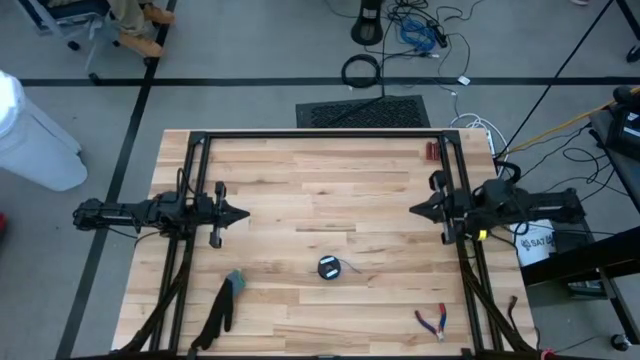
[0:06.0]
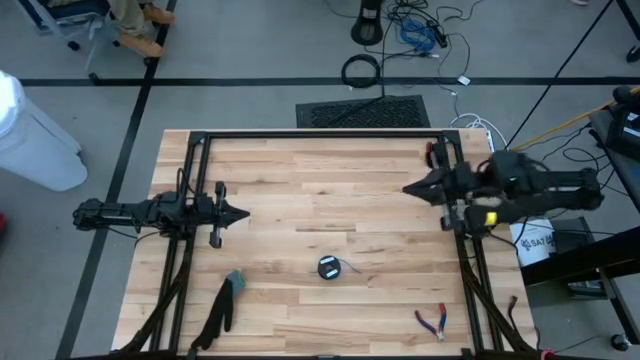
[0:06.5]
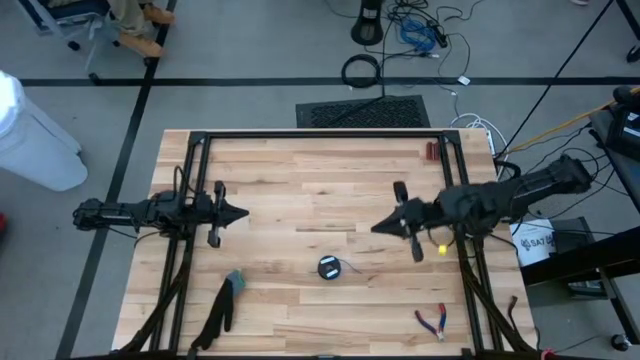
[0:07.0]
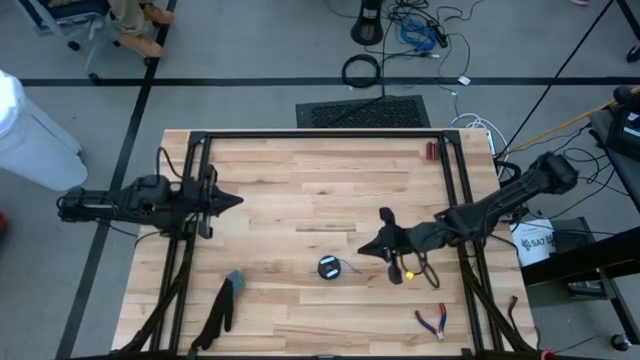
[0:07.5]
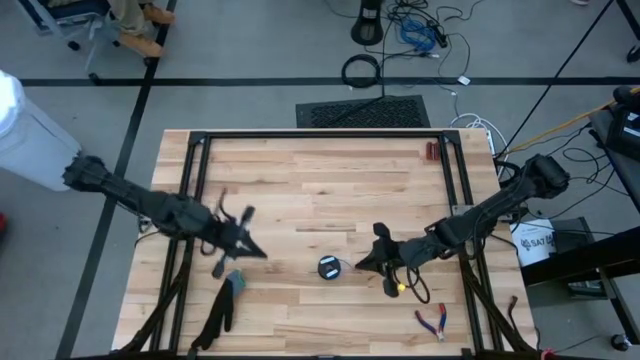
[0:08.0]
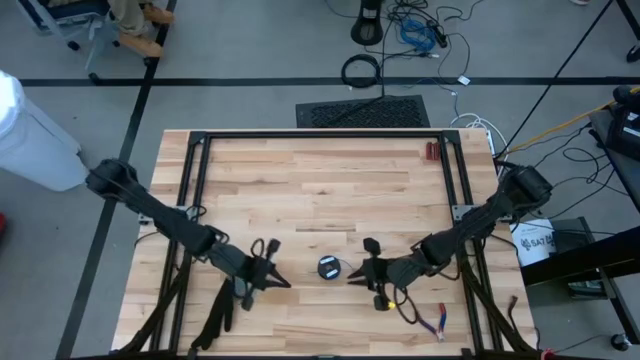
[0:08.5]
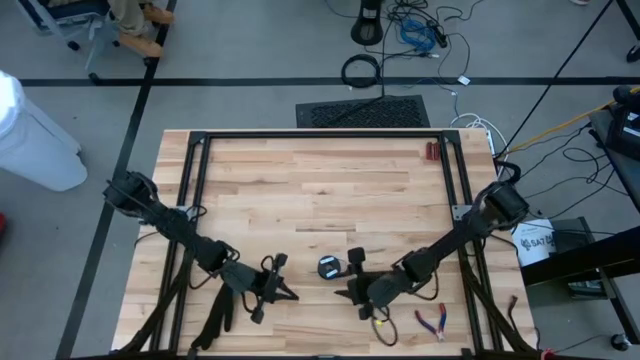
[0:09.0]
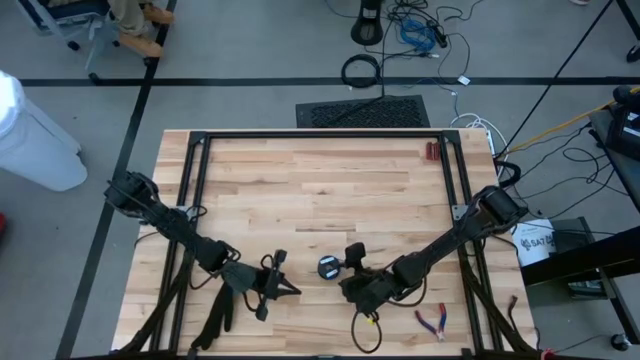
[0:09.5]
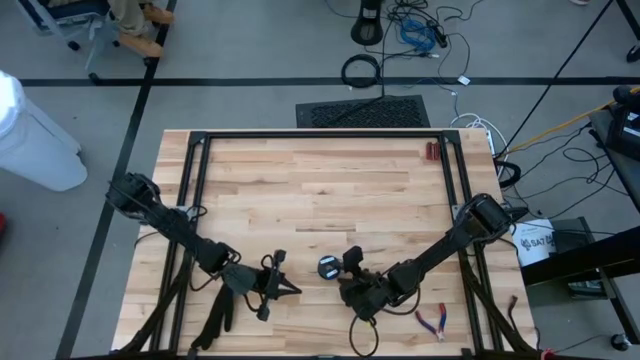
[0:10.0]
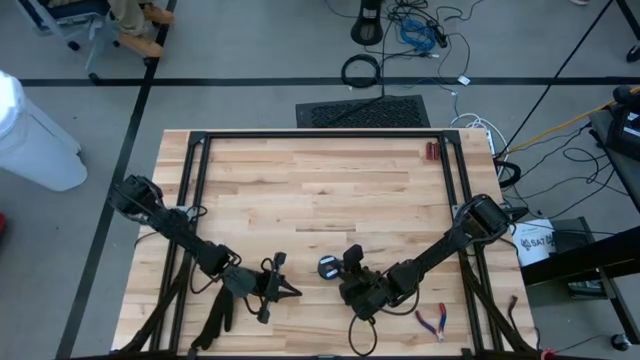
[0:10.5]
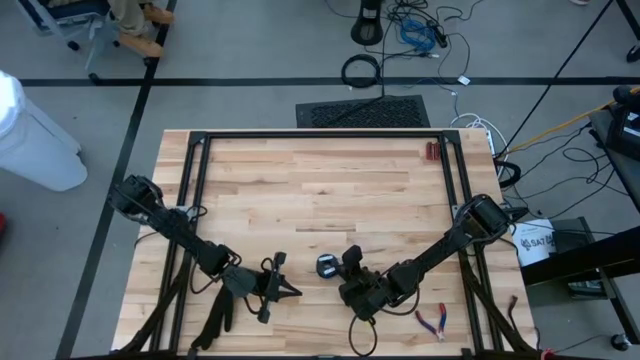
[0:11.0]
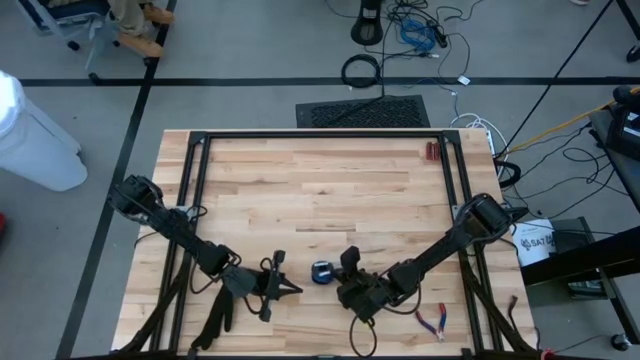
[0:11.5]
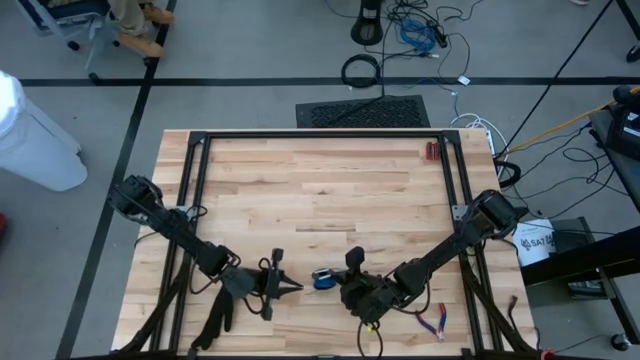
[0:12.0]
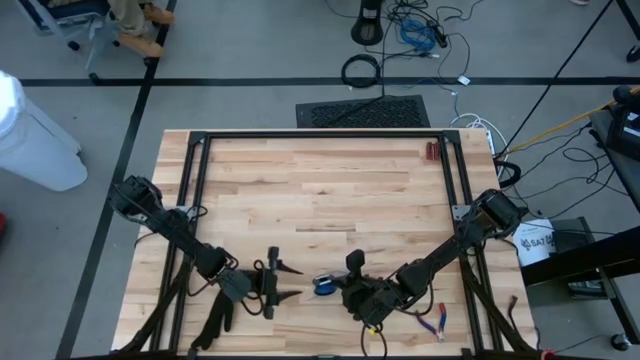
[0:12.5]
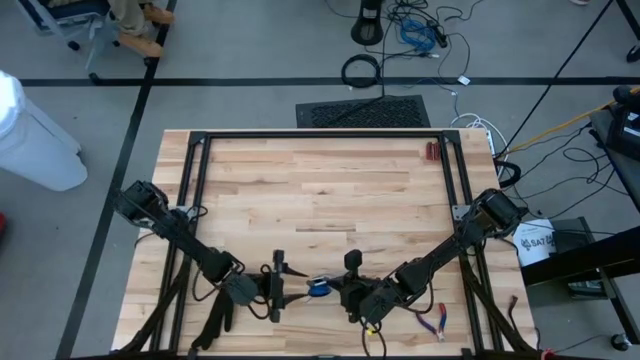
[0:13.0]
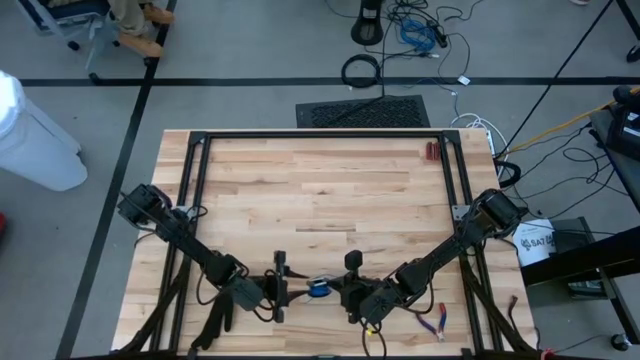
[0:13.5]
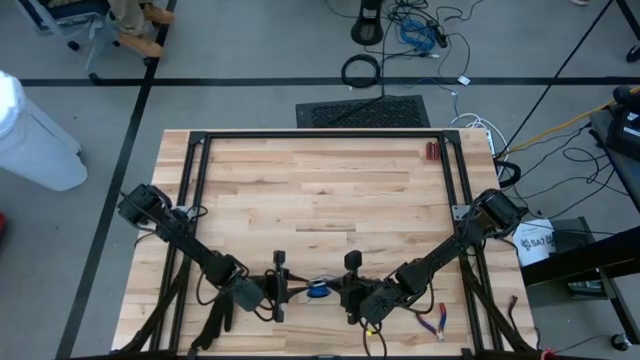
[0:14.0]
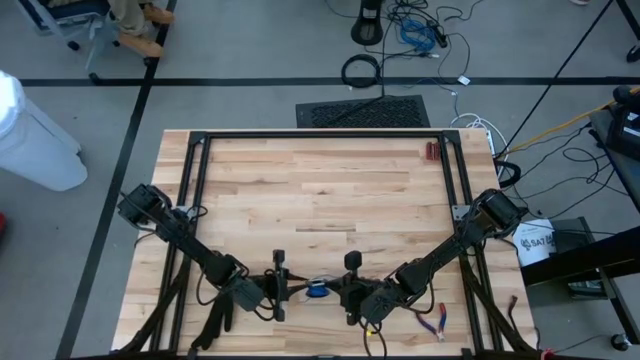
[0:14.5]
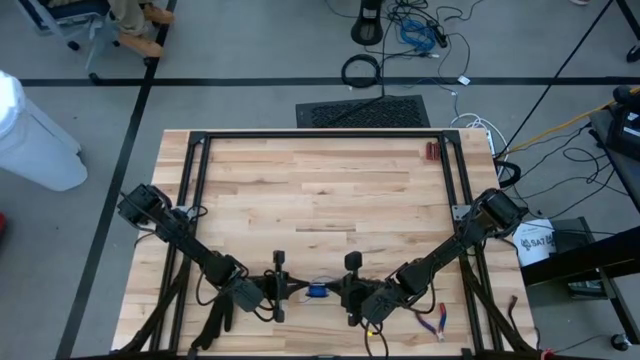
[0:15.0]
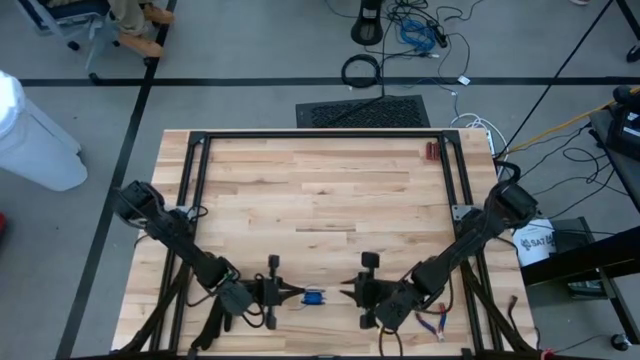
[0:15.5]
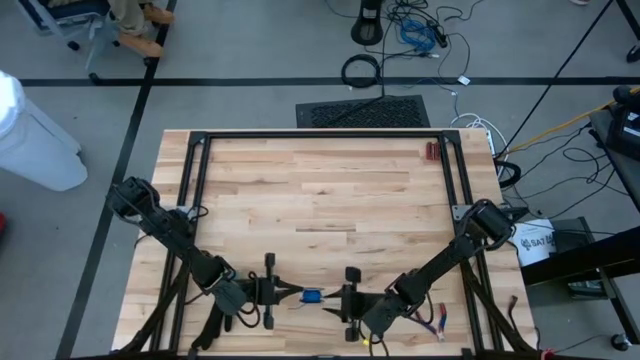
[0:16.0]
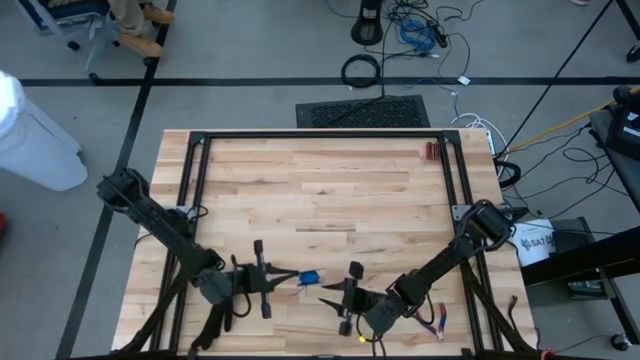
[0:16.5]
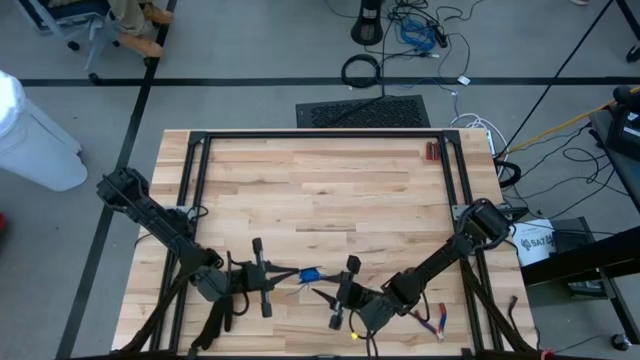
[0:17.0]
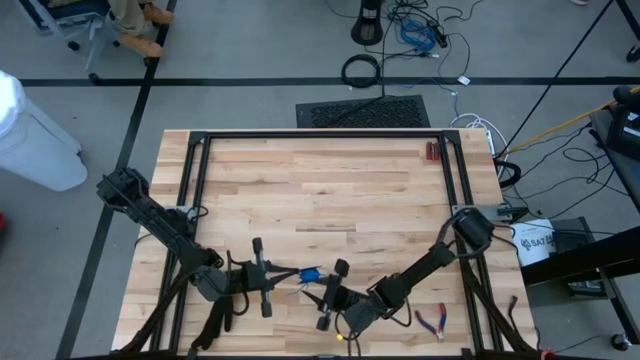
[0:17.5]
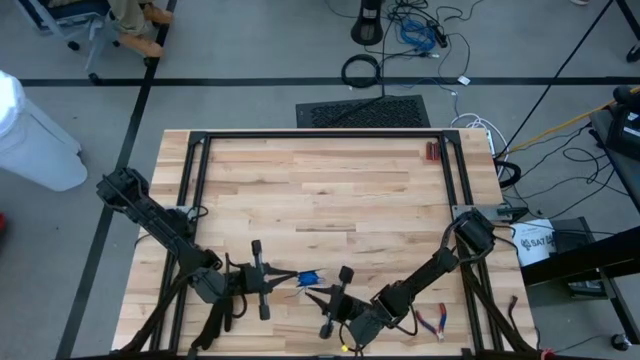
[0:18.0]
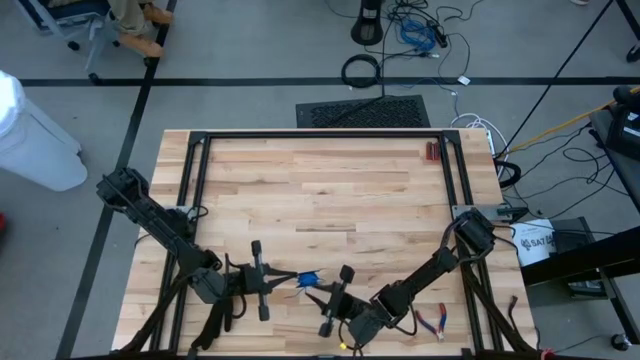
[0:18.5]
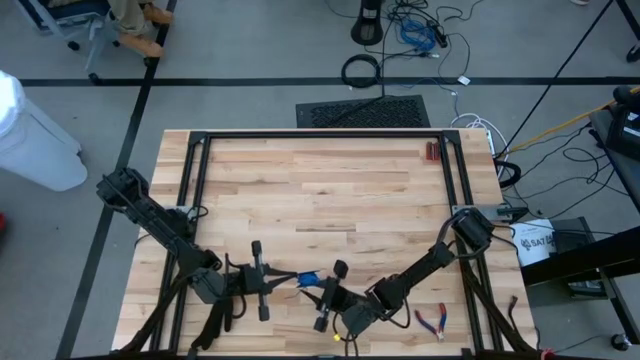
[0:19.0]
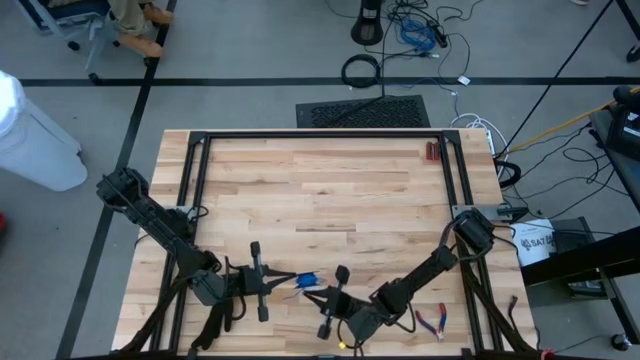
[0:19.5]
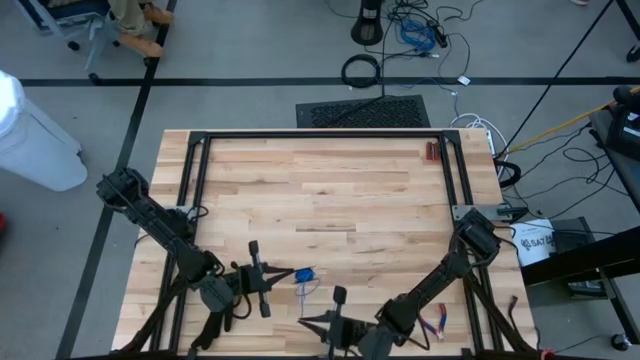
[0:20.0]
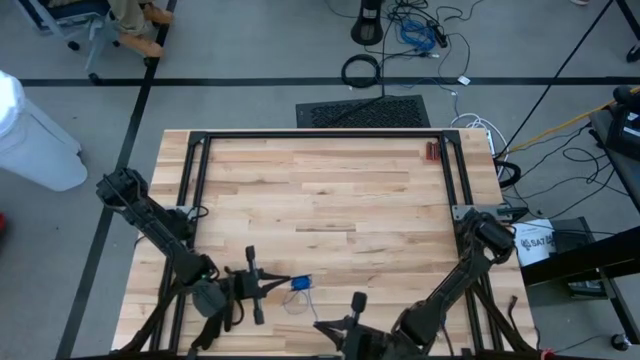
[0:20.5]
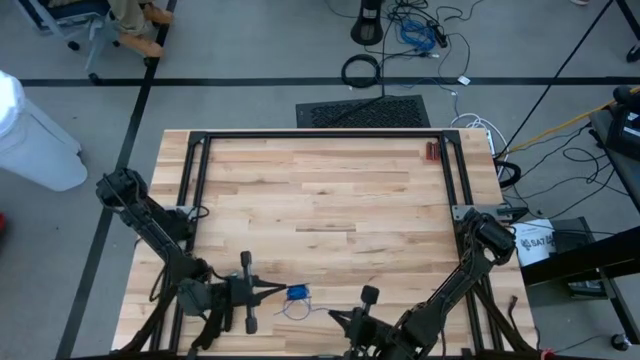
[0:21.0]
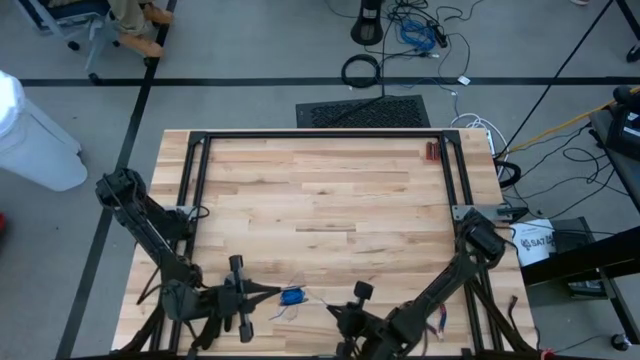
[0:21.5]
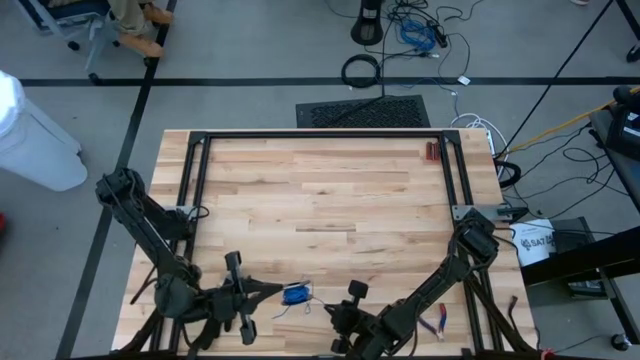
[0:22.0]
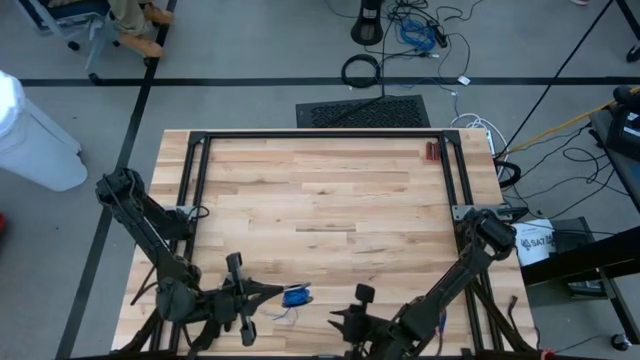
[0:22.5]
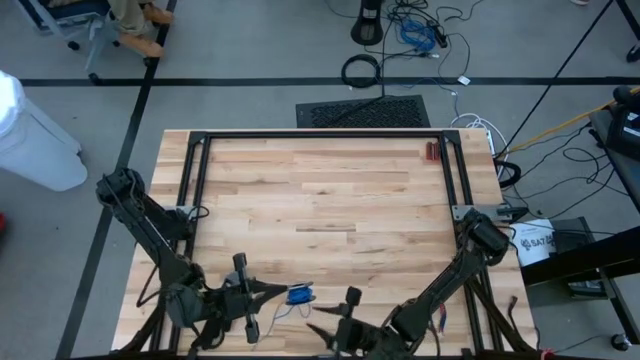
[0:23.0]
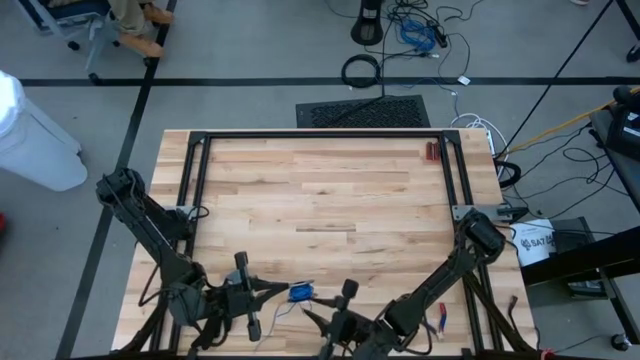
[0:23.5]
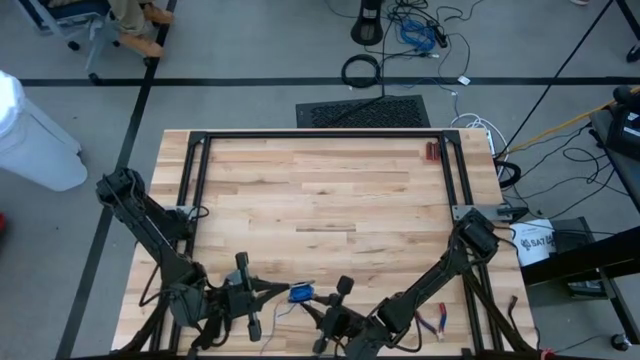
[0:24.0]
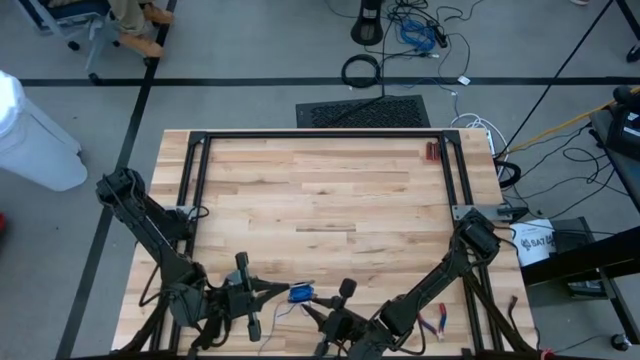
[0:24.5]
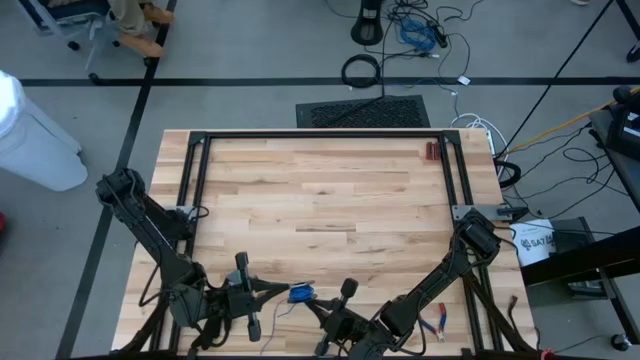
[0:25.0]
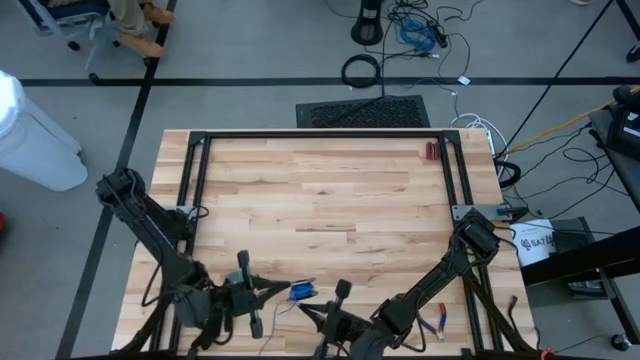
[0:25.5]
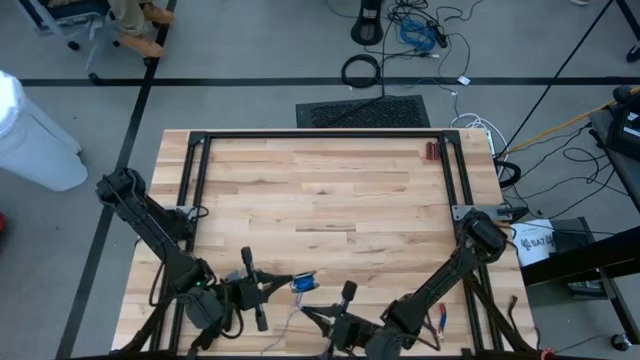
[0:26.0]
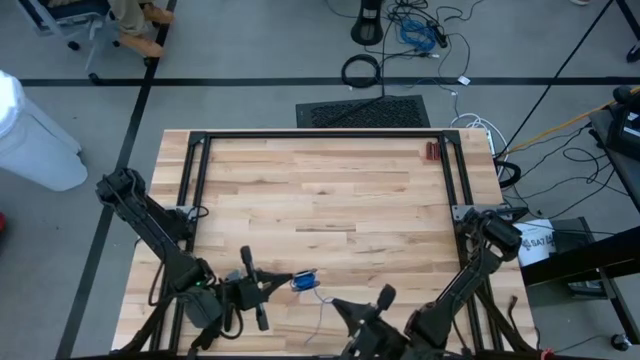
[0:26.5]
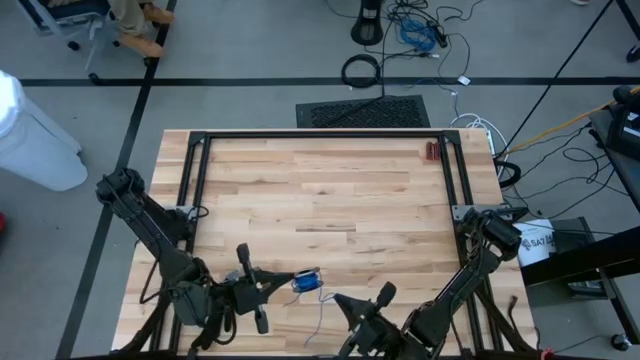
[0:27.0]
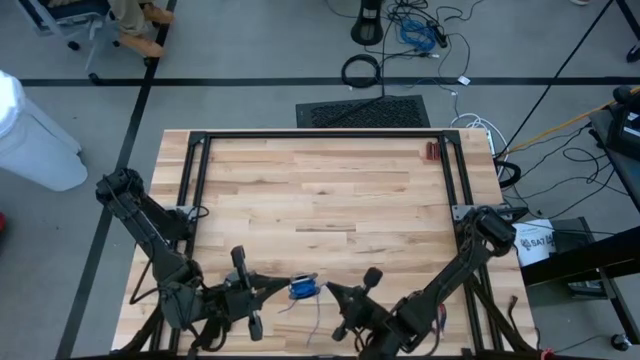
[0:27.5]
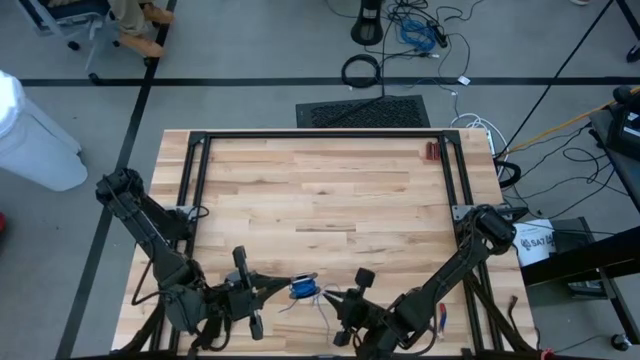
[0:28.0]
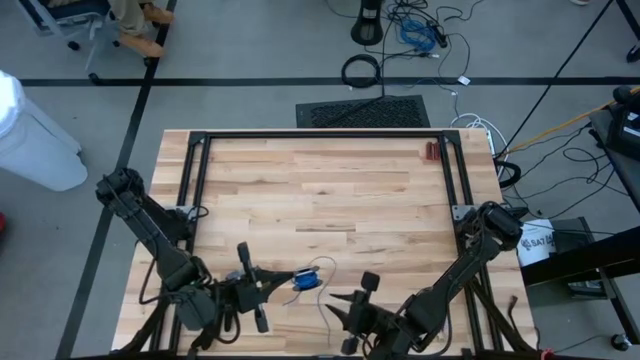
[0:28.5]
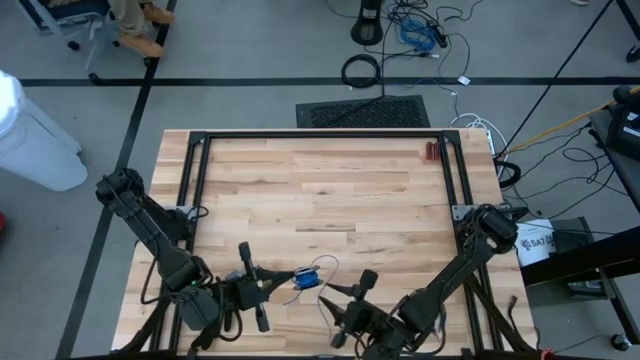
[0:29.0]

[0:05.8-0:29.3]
Task: Coil cords
Uncoil the blue wire from the black spool
